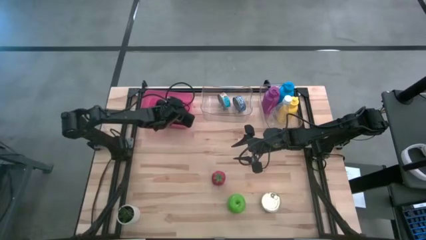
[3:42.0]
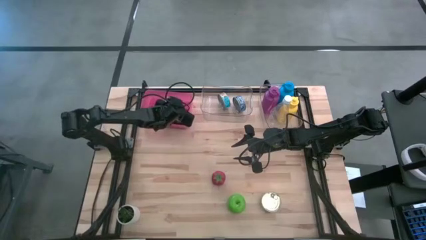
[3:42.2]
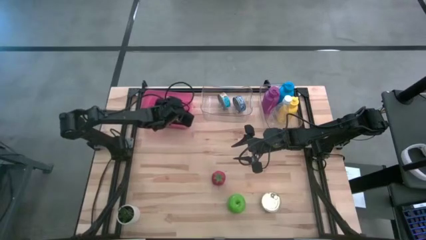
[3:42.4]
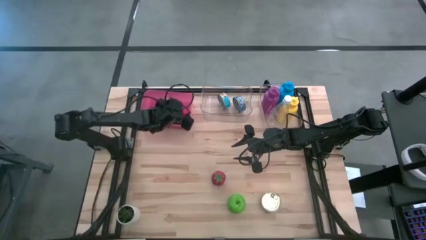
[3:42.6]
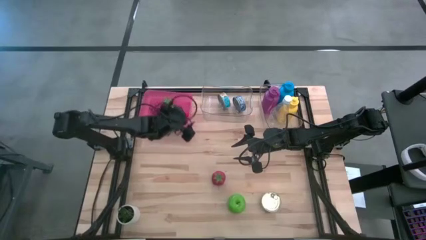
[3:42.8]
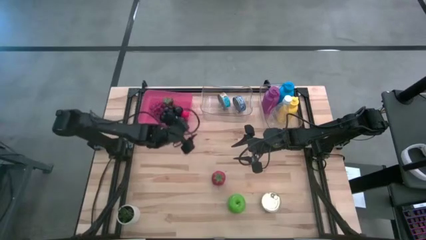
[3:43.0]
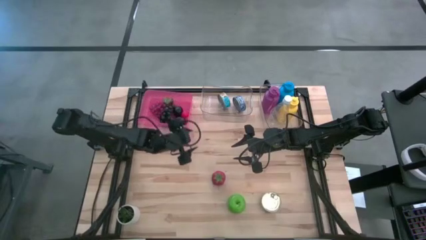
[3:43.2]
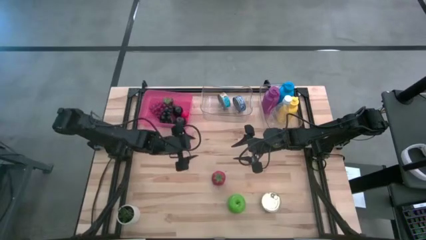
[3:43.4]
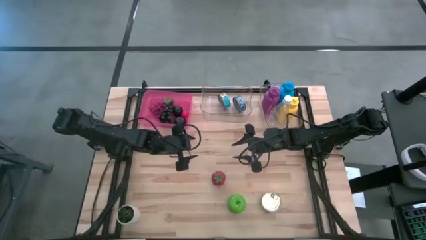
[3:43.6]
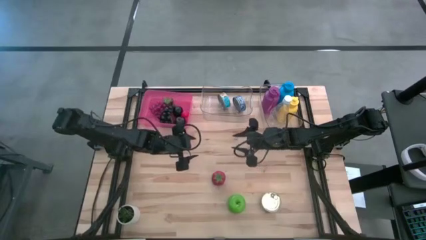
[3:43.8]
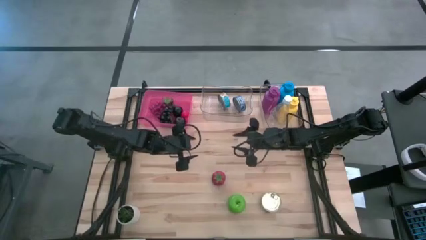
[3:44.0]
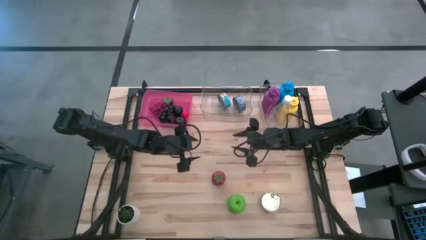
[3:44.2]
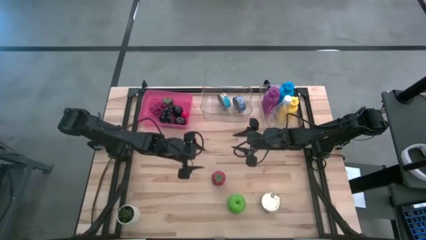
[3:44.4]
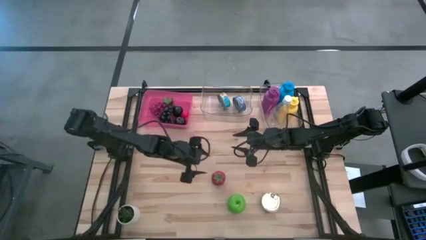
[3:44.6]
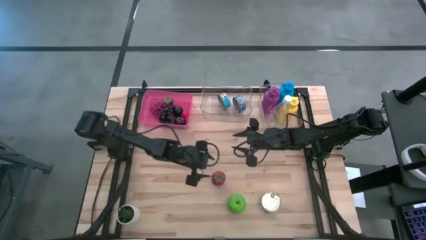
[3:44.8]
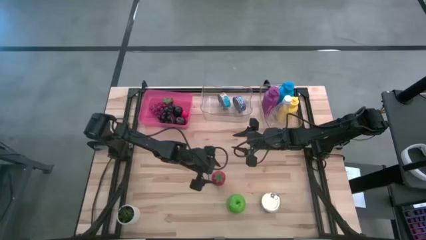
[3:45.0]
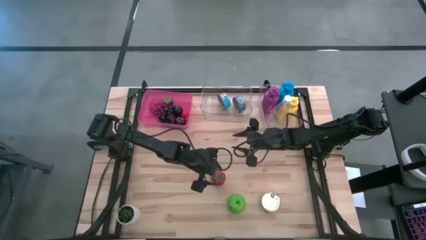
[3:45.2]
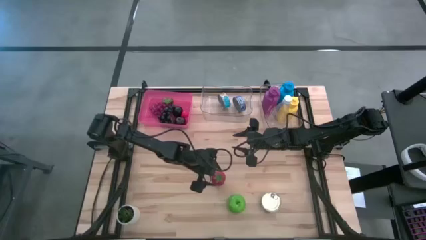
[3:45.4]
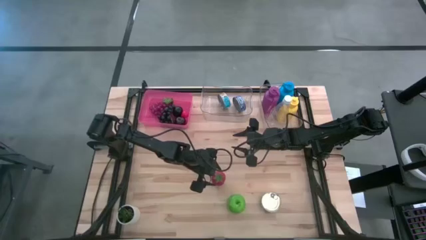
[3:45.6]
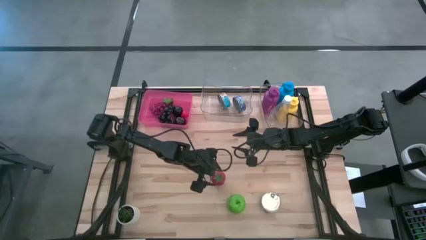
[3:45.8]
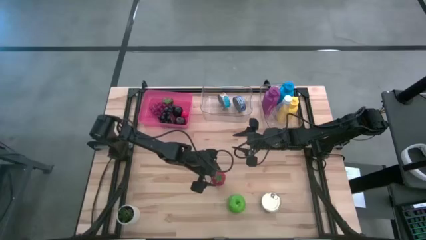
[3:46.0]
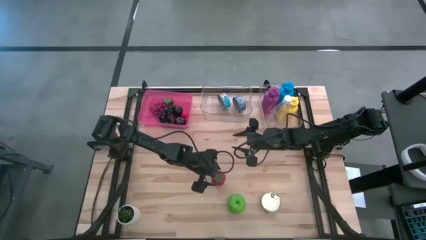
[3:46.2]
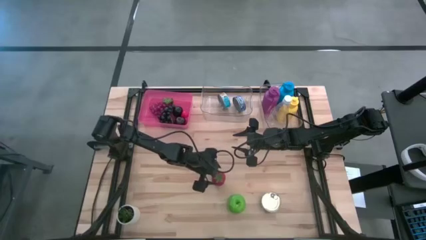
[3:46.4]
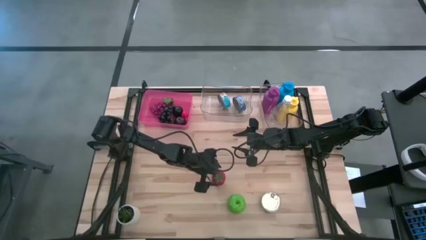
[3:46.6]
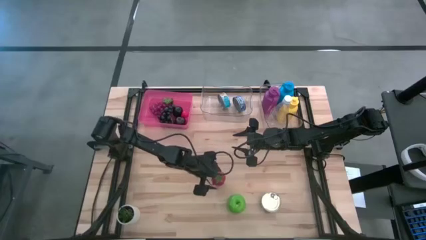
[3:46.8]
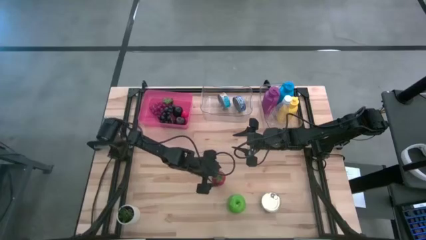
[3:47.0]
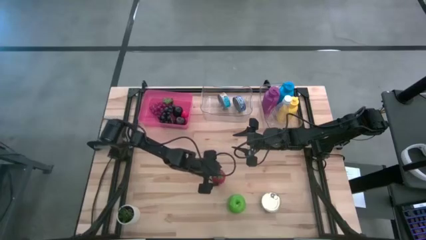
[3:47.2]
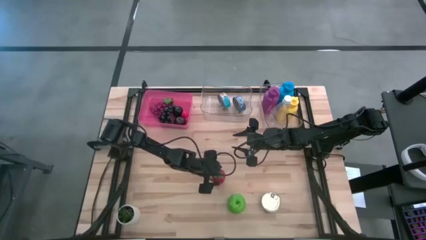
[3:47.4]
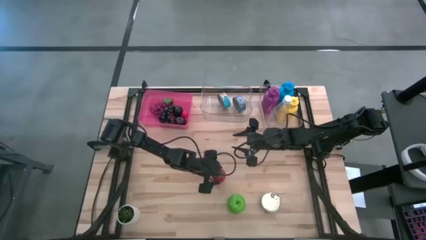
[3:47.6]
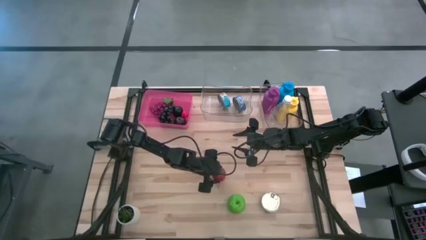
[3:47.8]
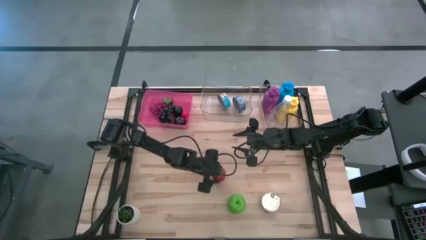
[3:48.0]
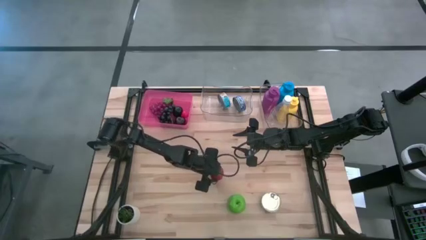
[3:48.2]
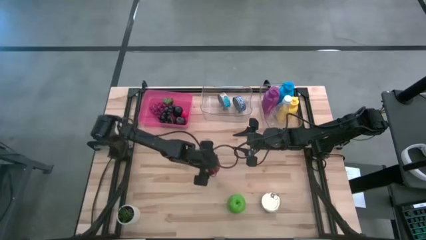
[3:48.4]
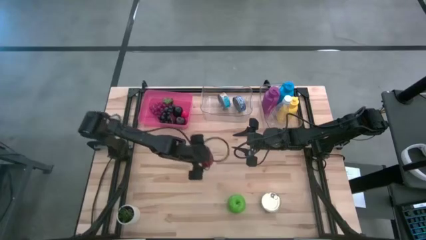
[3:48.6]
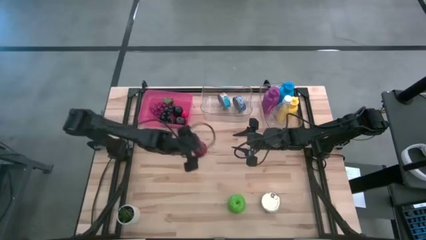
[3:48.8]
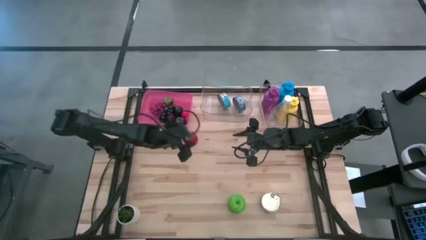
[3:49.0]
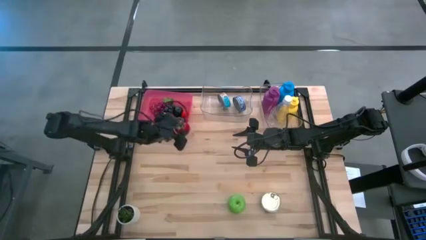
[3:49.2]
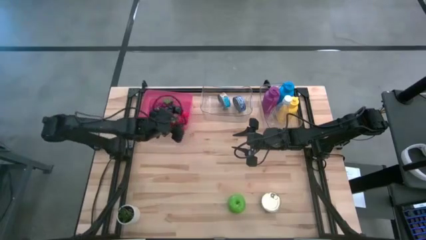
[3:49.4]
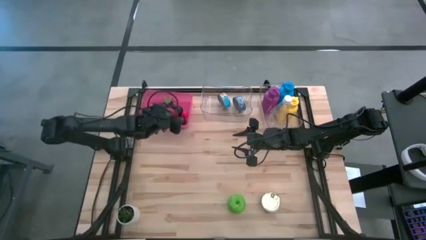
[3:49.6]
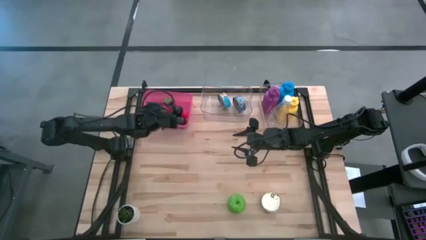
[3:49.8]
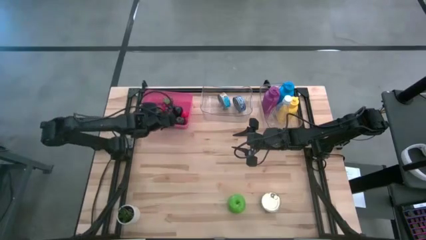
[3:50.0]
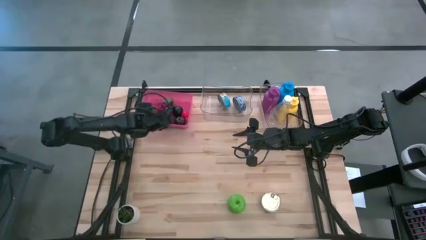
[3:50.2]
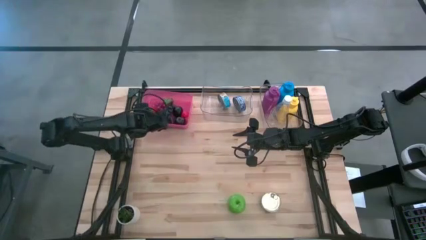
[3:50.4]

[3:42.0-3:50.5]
Task: Pick & Place Food Item
Put the tomato into the pink bin

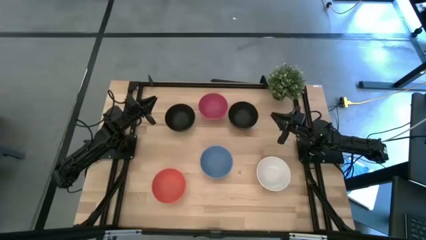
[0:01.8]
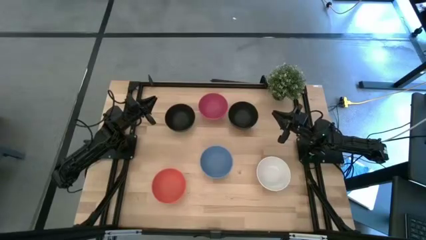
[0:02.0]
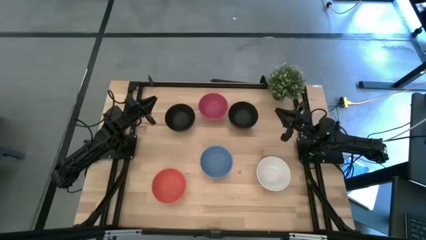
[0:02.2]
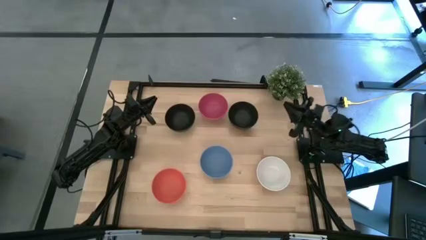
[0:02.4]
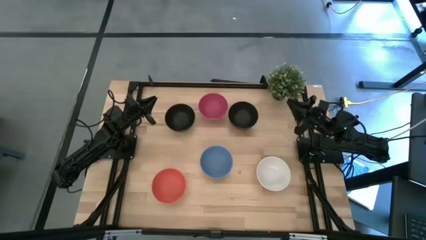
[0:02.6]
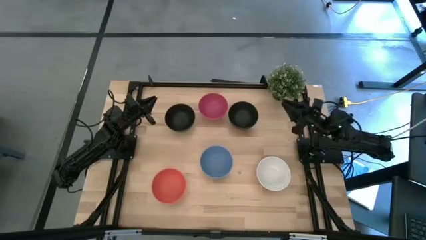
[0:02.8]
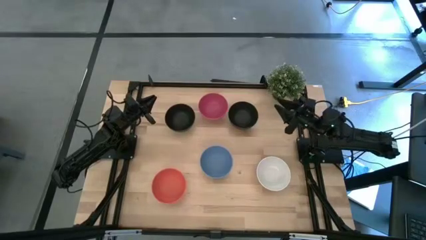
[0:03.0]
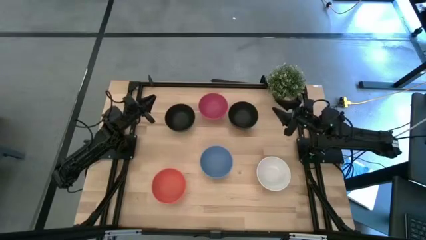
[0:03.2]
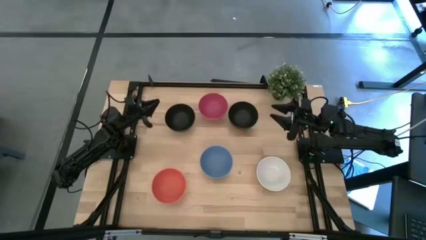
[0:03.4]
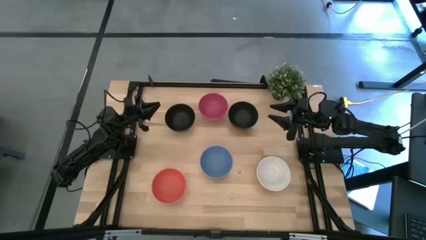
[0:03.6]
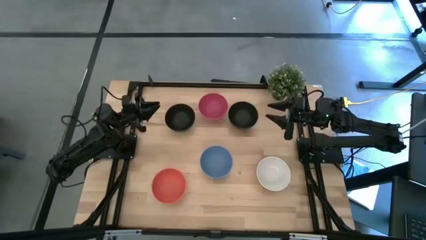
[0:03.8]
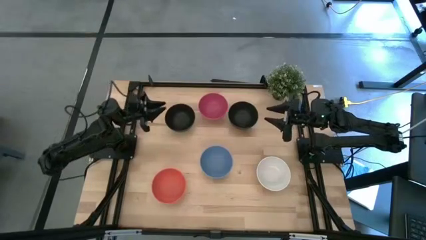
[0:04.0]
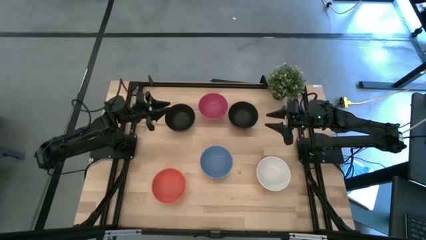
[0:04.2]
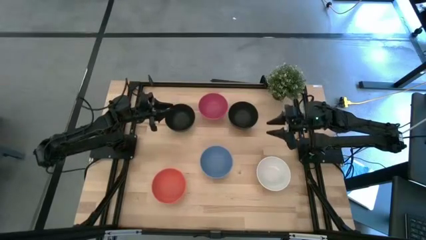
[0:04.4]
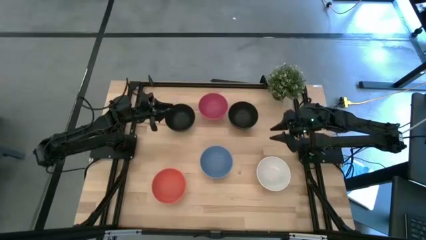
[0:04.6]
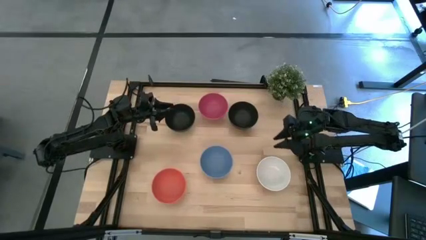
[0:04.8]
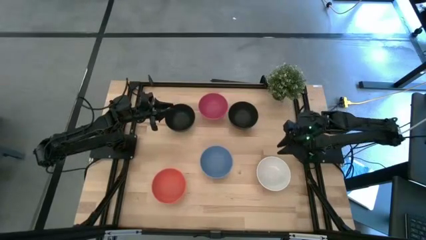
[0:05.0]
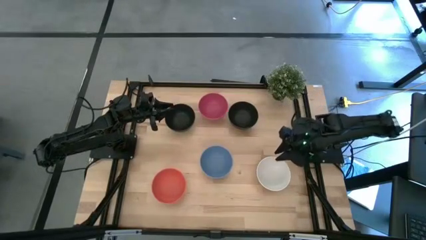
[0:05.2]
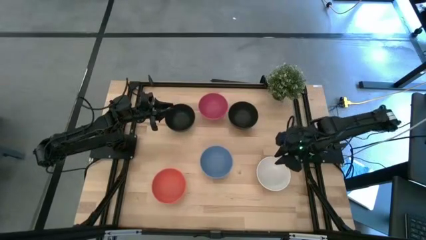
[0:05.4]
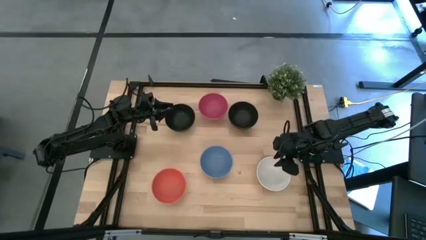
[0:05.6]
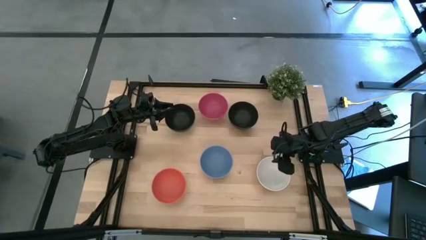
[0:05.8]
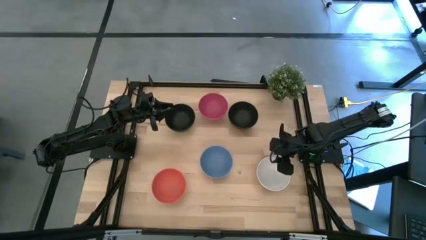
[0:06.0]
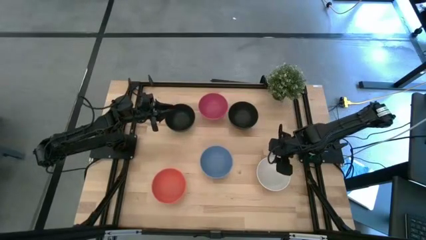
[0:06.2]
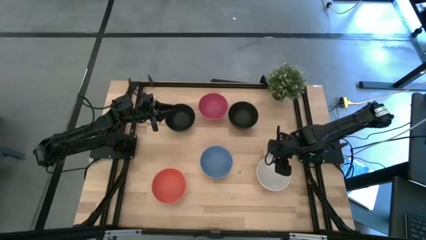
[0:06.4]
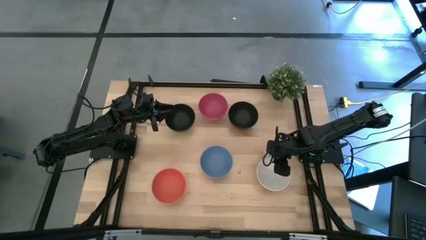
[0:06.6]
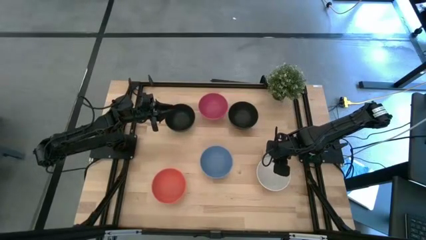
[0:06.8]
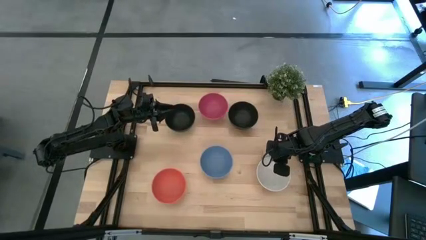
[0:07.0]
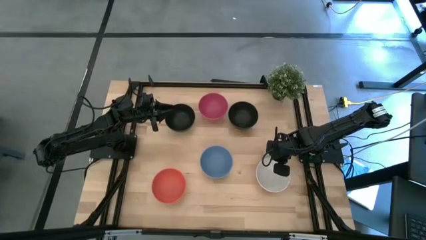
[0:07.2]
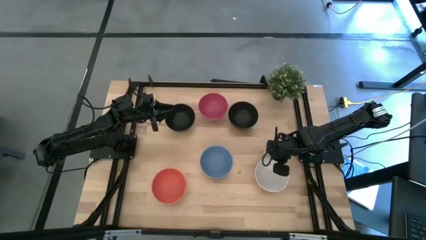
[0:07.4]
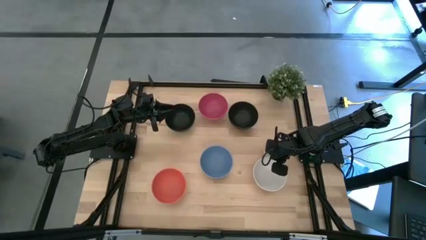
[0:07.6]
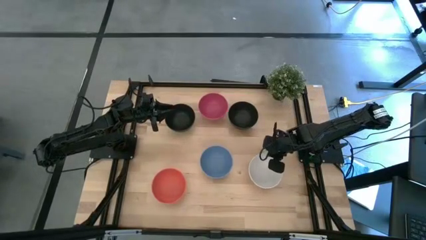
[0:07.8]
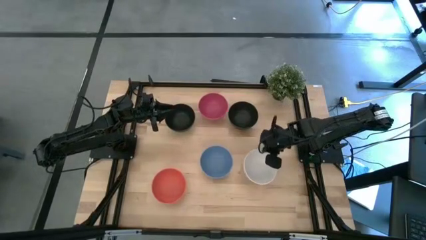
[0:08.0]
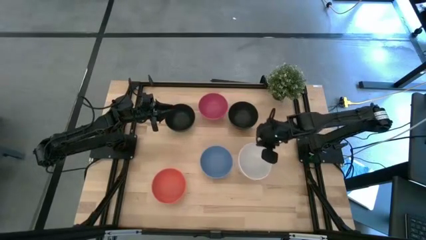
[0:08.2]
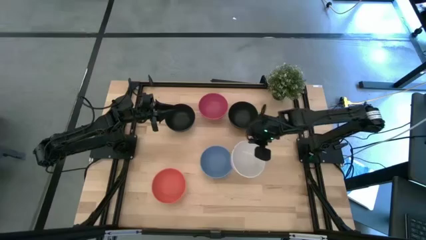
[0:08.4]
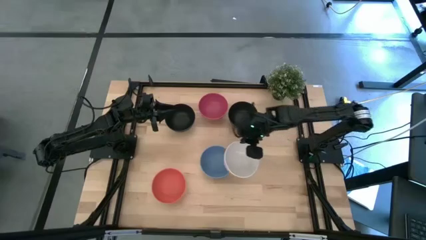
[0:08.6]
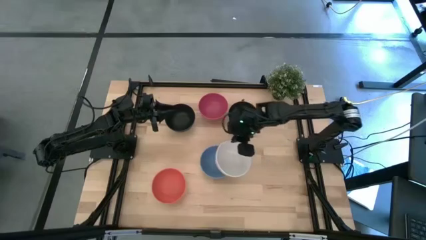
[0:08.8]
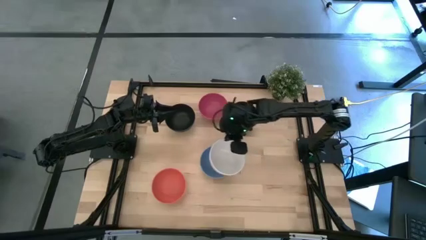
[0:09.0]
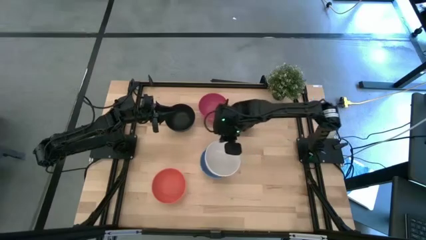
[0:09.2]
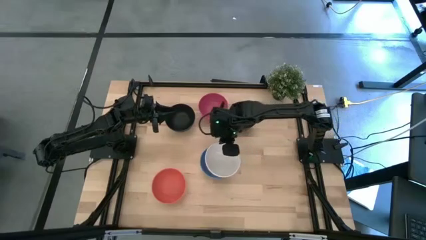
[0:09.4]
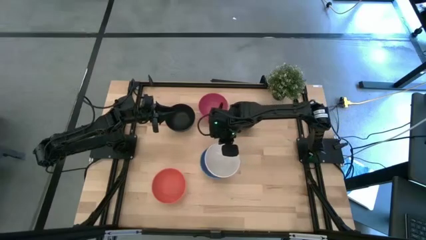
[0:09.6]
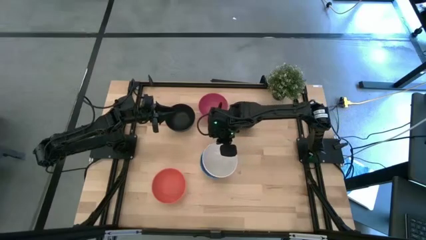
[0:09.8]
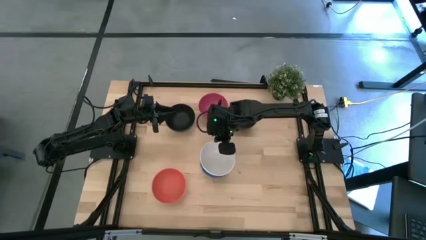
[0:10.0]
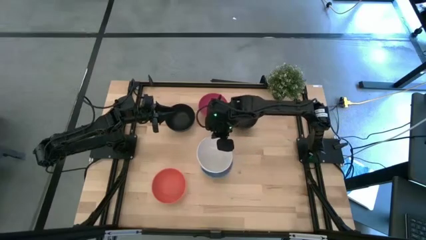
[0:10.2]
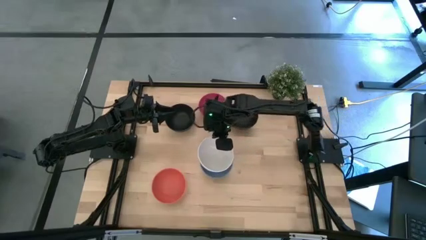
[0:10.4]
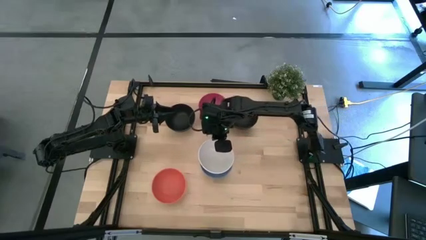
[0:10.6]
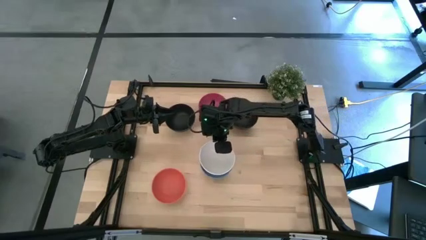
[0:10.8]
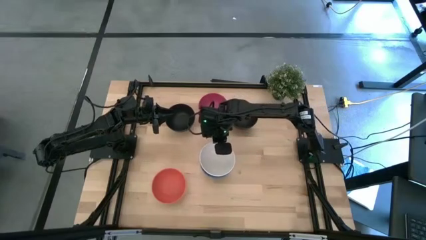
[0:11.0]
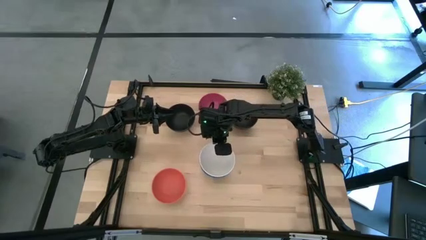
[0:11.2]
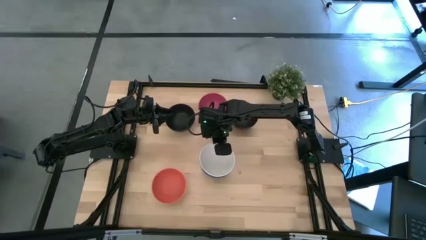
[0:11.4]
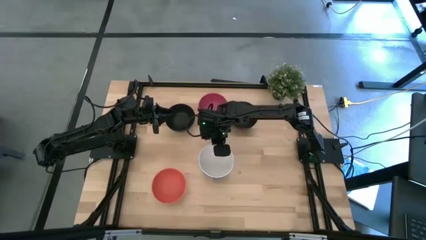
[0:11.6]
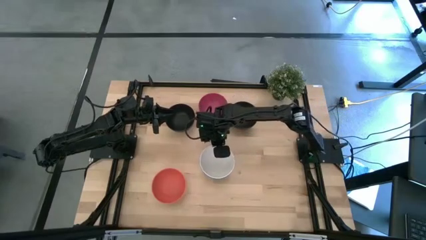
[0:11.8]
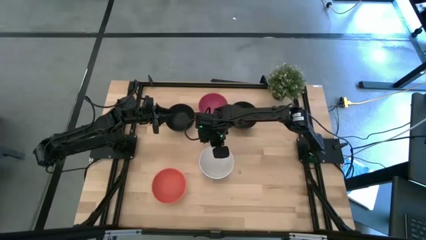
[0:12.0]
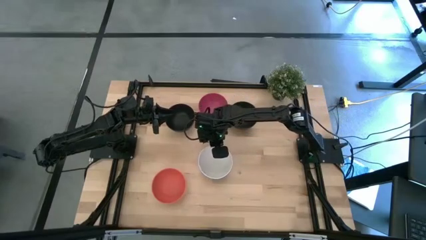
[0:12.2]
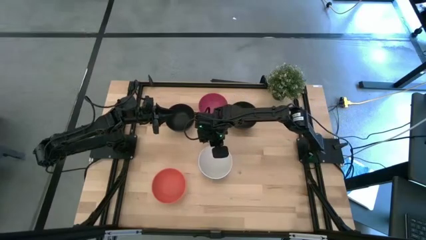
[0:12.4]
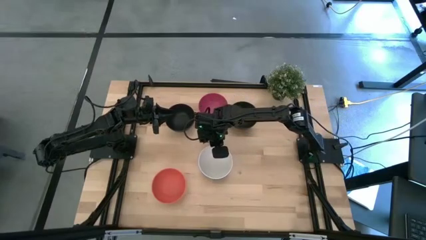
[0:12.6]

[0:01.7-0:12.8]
Task: Nest bowls inside each other
Stack the white bowl on top of the blue bowl
